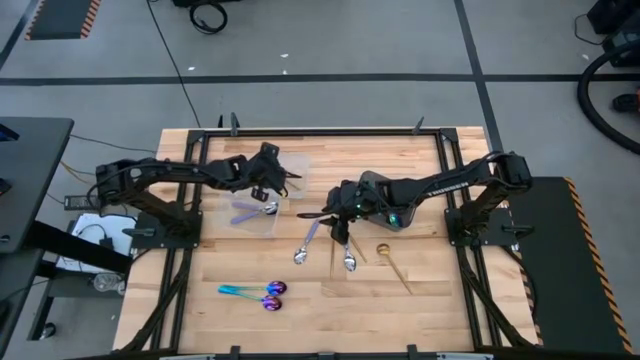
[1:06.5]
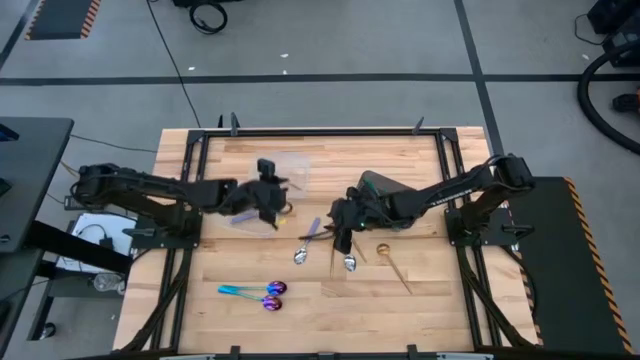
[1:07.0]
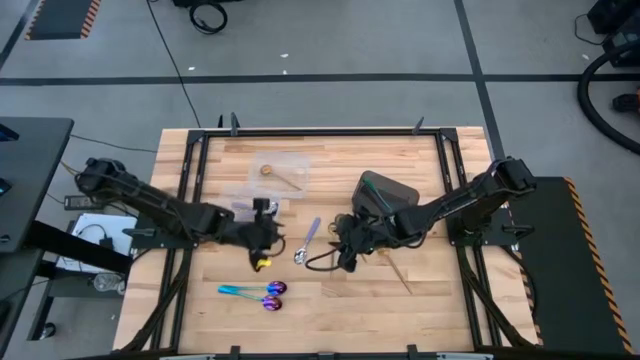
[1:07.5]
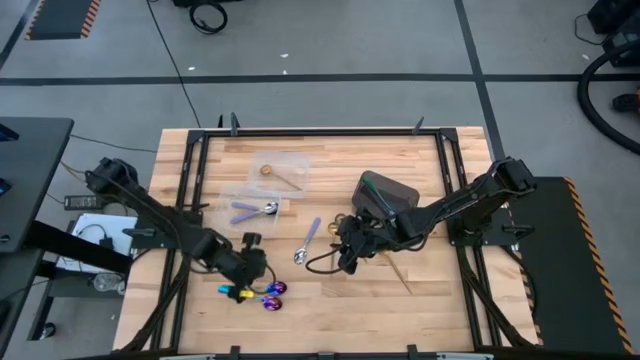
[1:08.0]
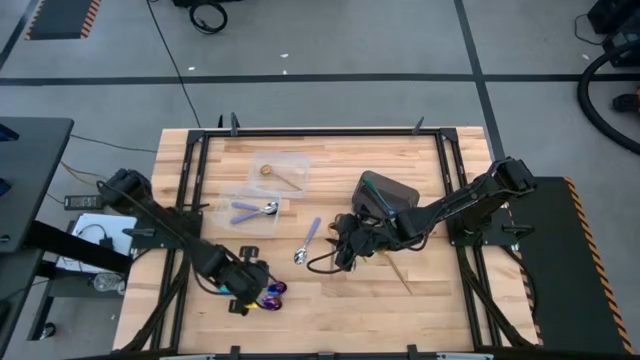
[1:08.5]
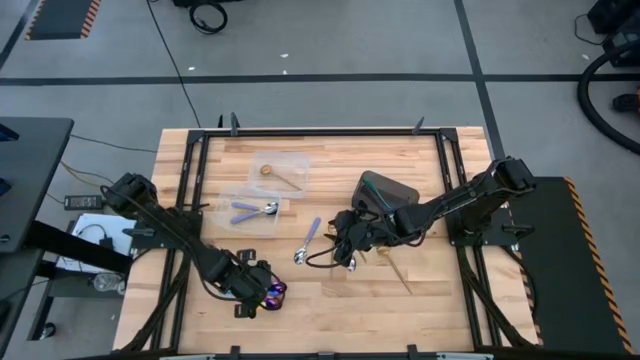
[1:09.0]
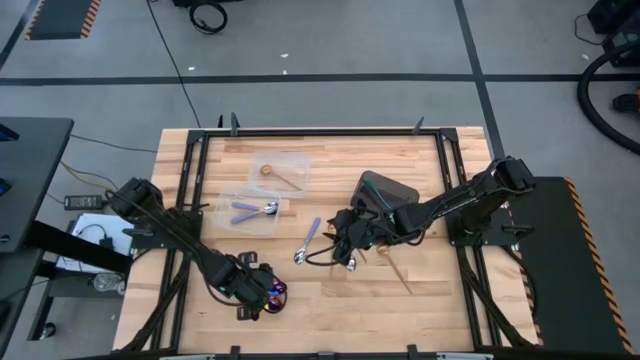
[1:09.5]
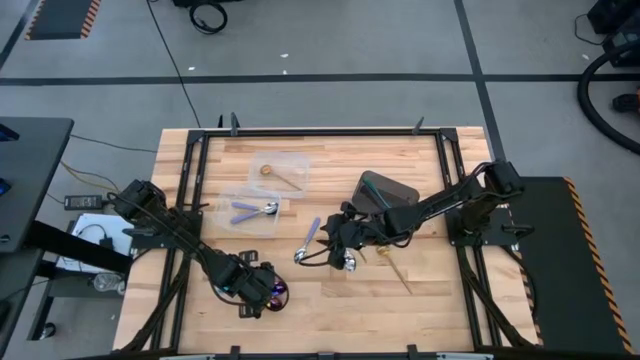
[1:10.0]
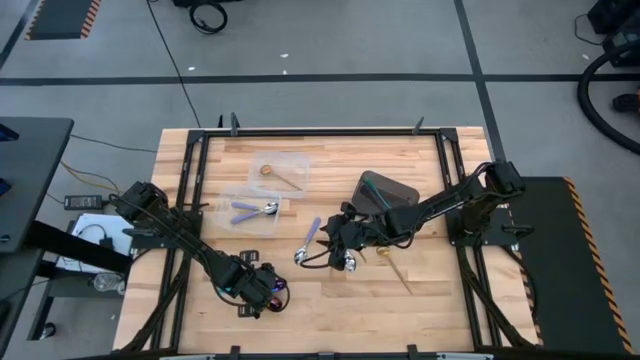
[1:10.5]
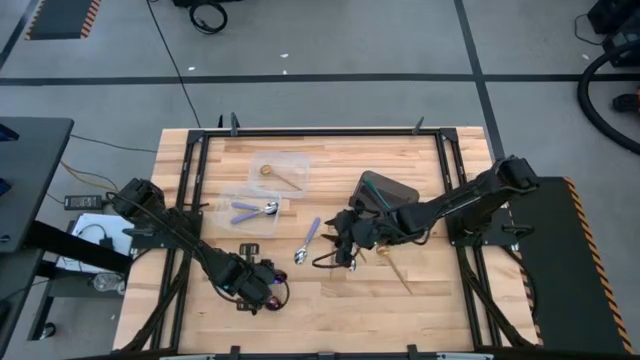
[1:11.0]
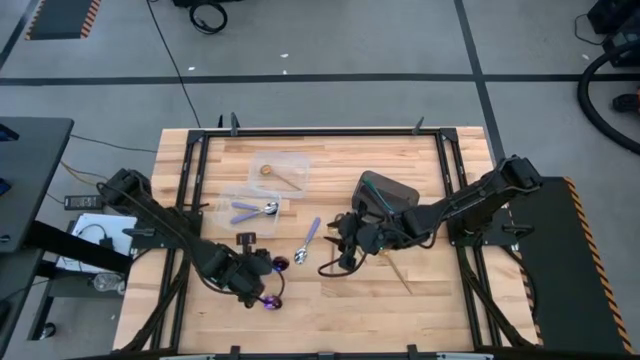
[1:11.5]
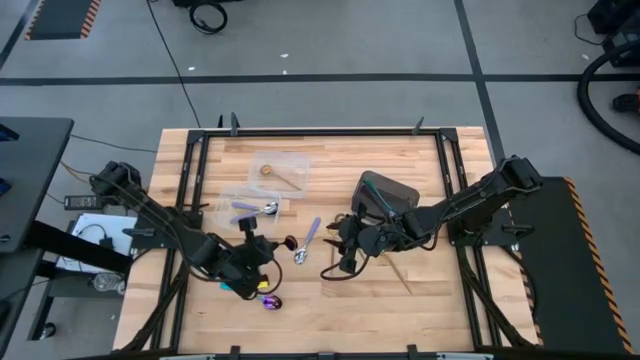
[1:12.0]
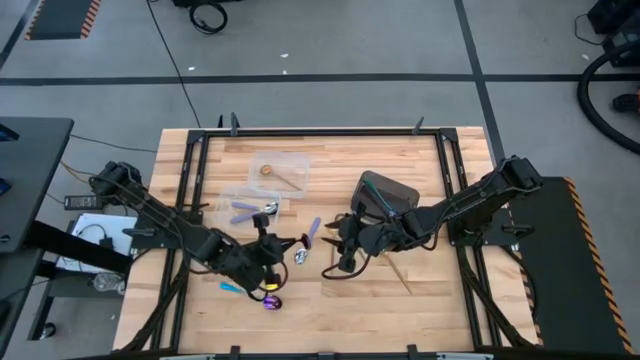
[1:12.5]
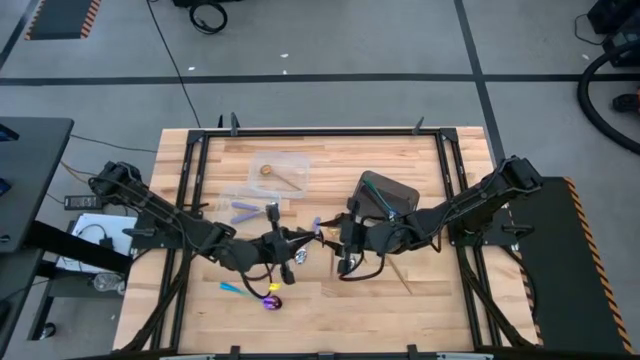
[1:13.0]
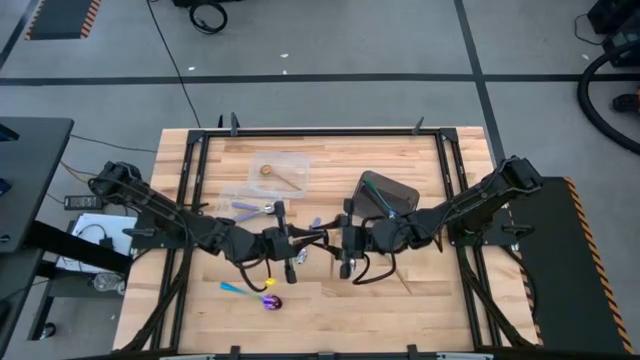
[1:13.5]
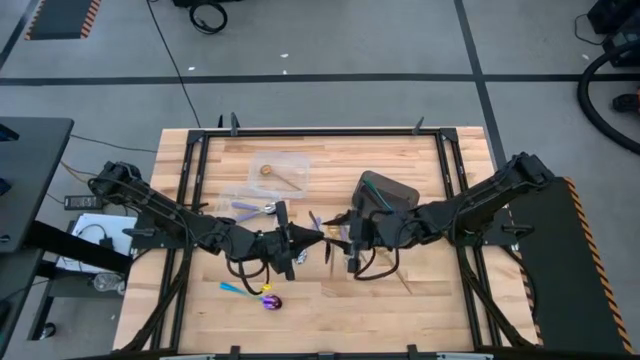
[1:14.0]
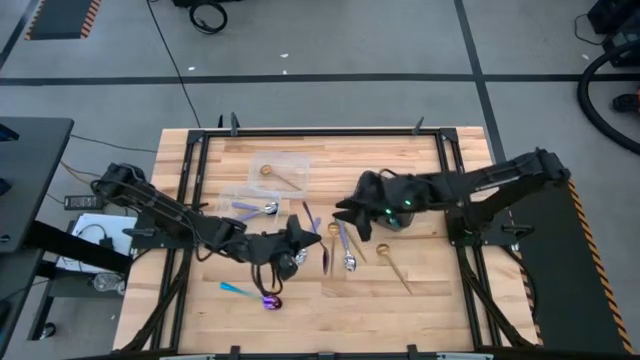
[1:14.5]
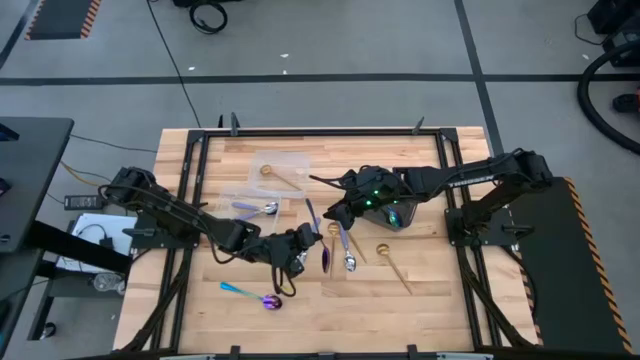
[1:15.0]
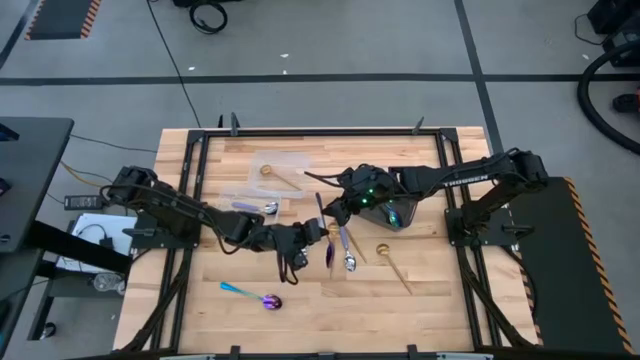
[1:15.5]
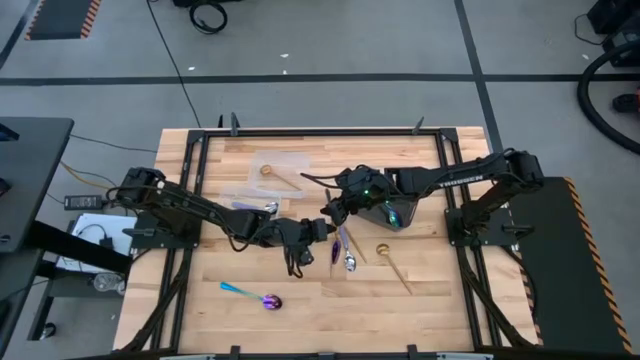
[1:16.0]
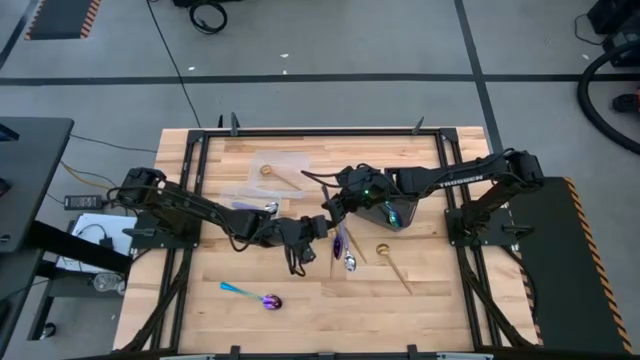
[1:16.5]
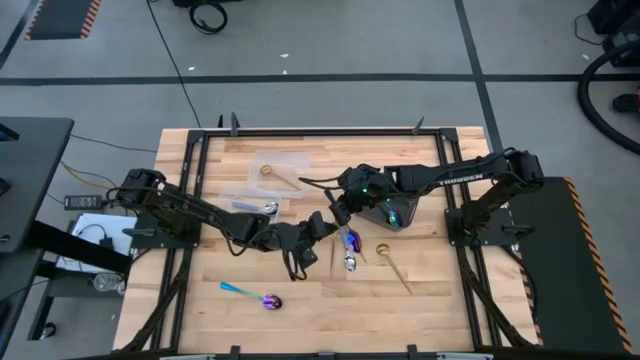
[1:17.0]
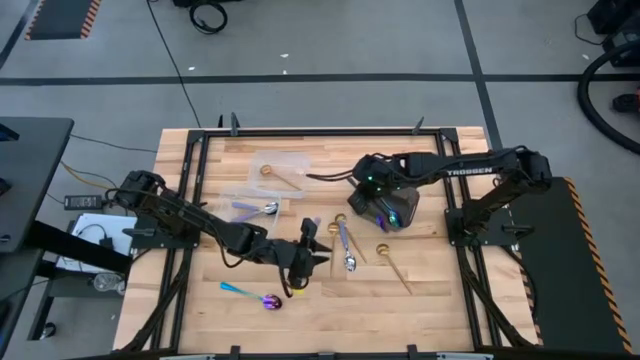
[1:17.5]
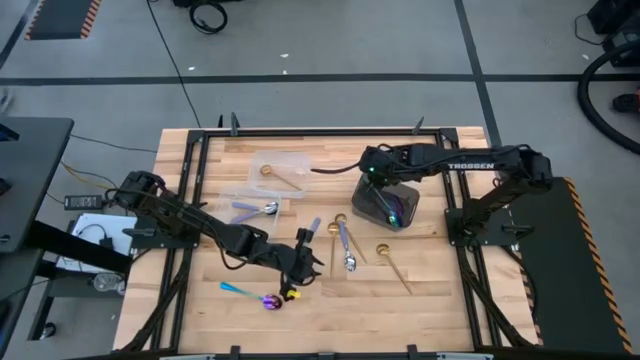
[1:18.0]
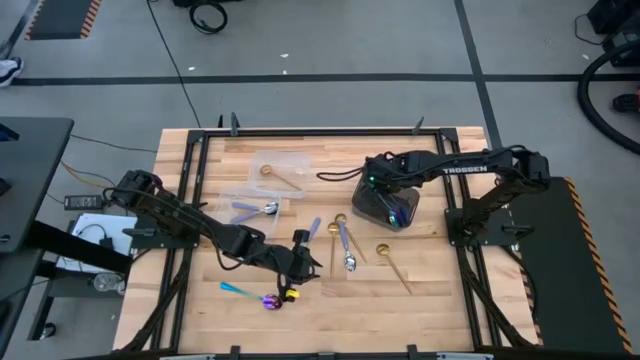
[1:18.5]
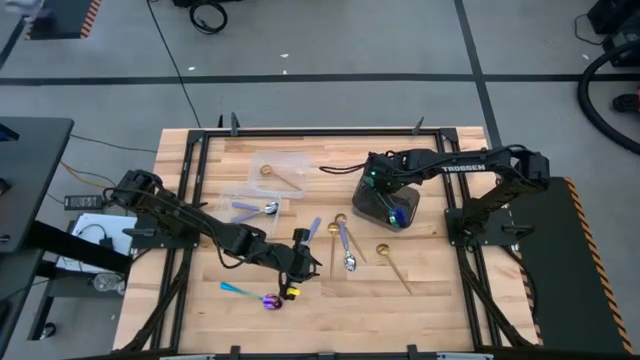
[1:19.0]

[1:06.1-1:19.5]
Task: Sort silverware by color (type)
Put the purple spoon into the black bin

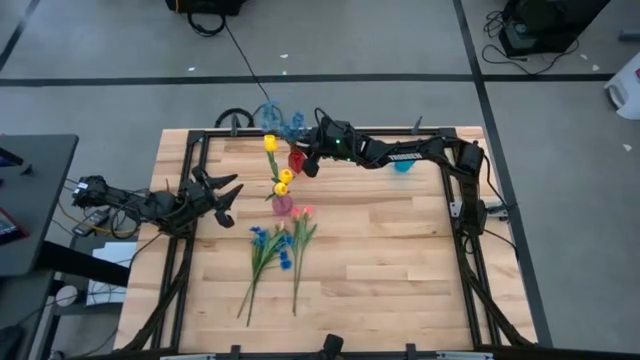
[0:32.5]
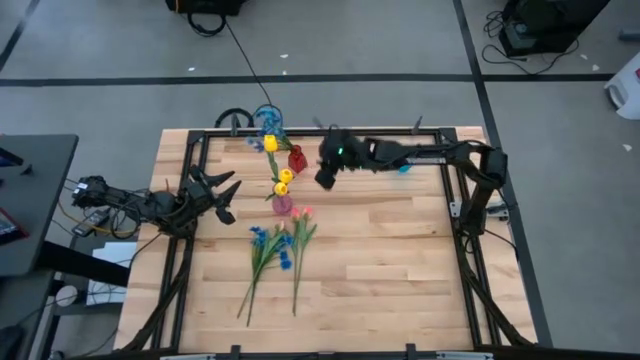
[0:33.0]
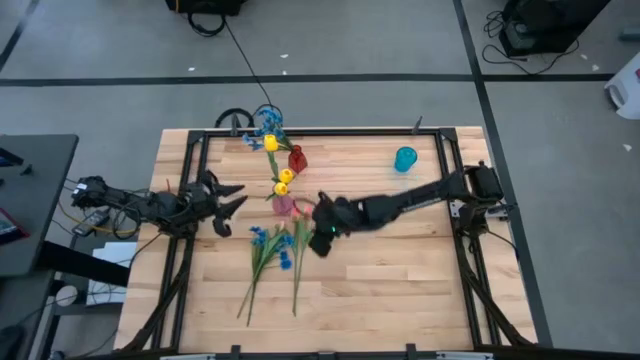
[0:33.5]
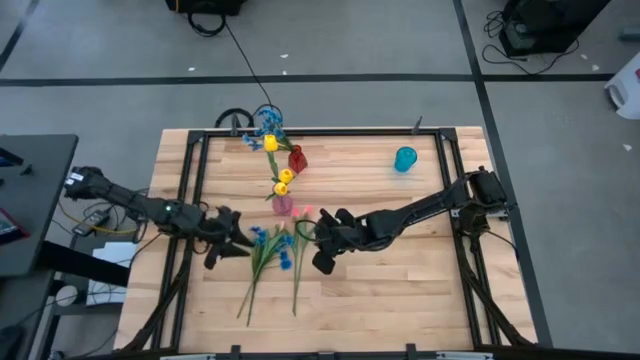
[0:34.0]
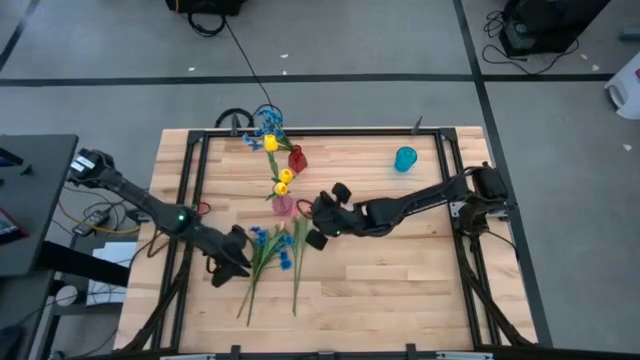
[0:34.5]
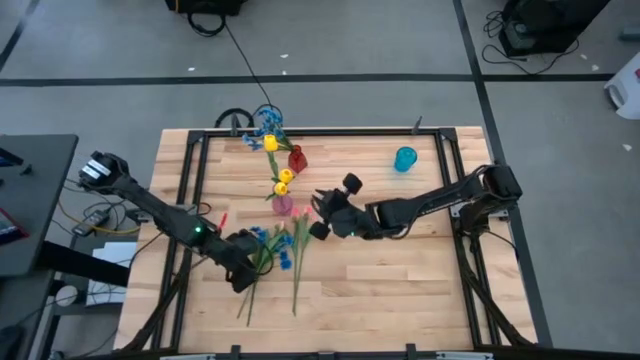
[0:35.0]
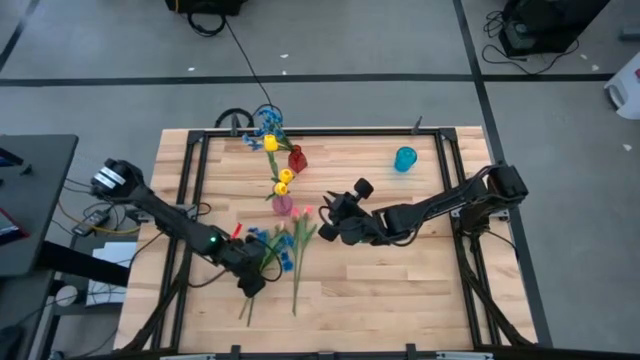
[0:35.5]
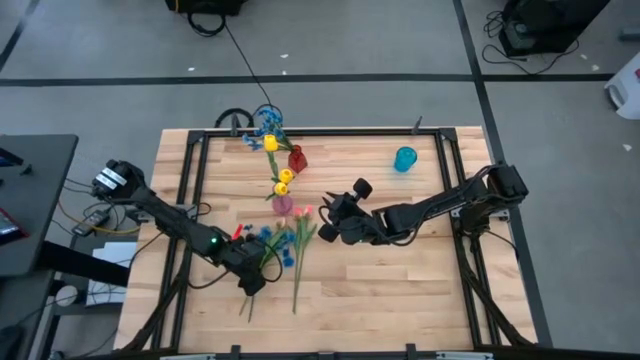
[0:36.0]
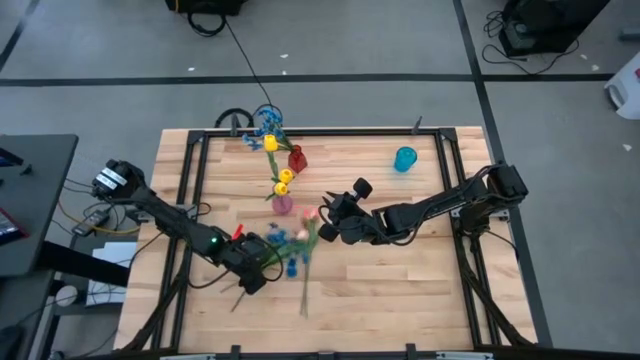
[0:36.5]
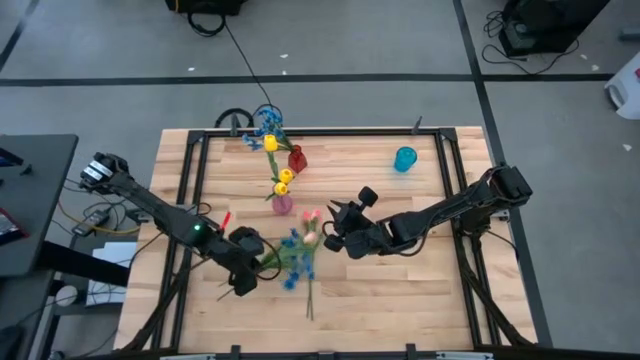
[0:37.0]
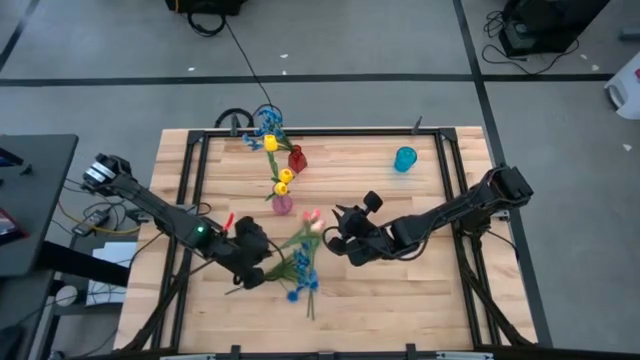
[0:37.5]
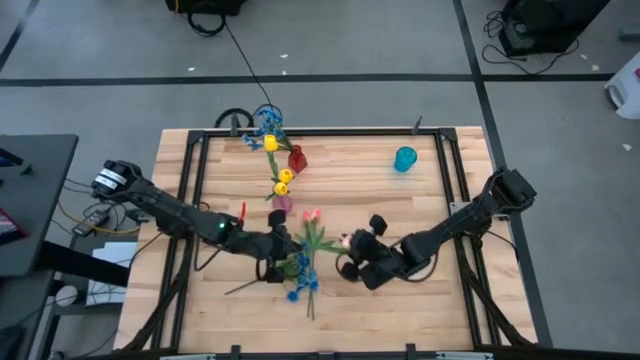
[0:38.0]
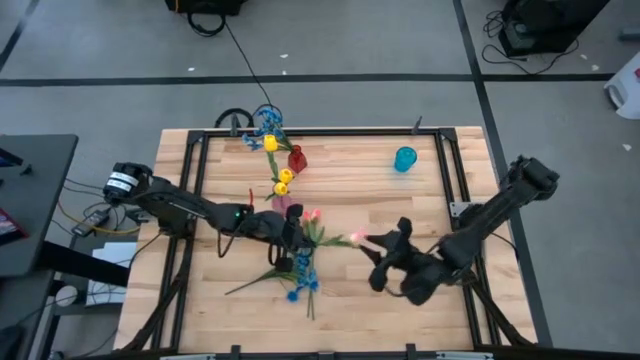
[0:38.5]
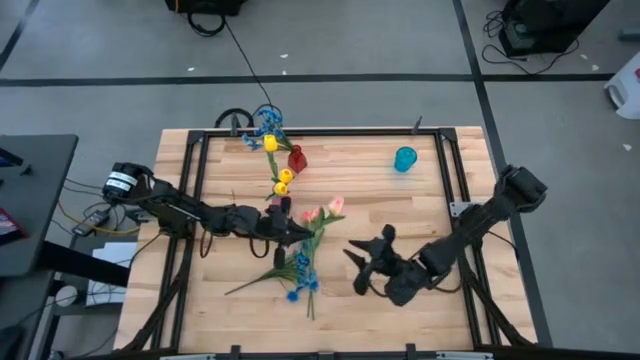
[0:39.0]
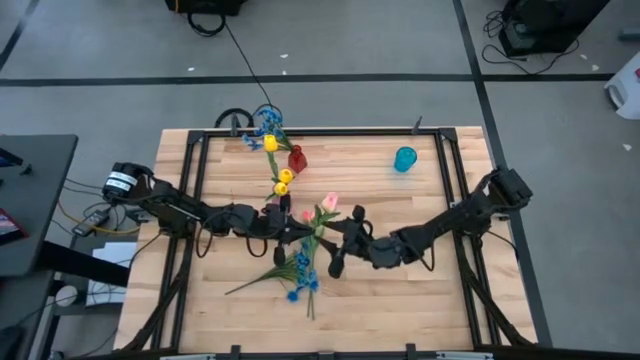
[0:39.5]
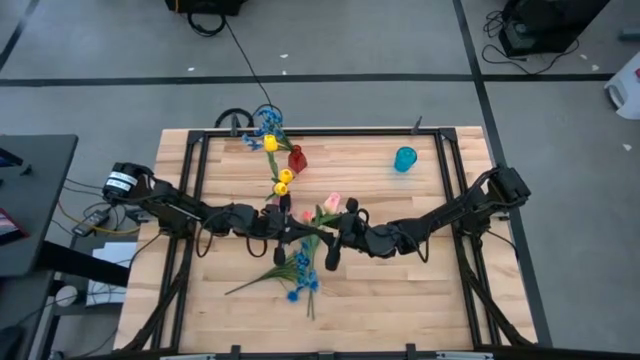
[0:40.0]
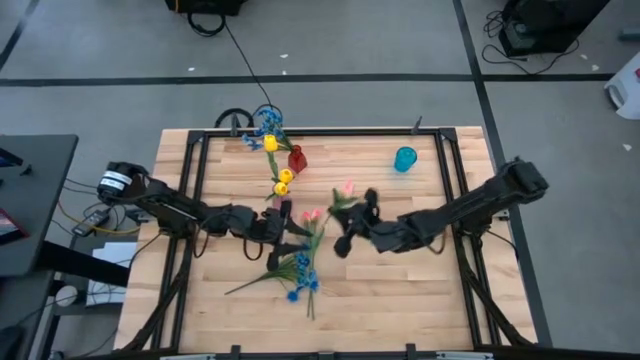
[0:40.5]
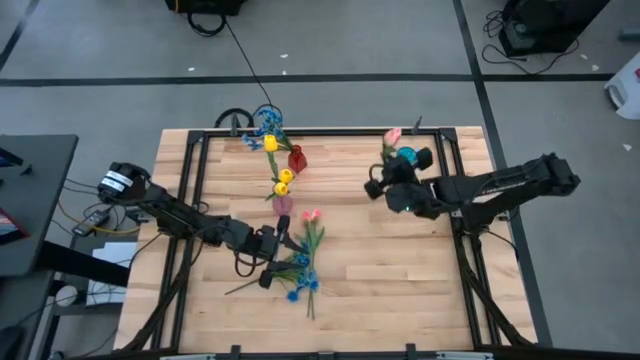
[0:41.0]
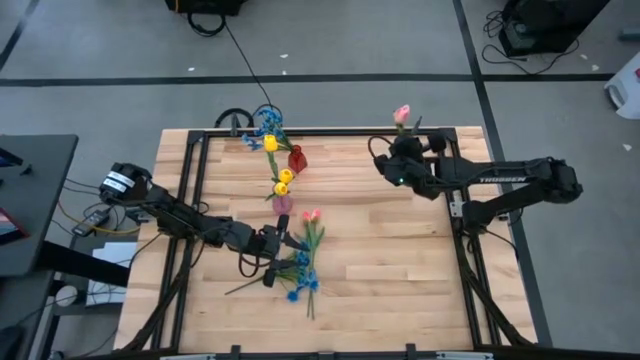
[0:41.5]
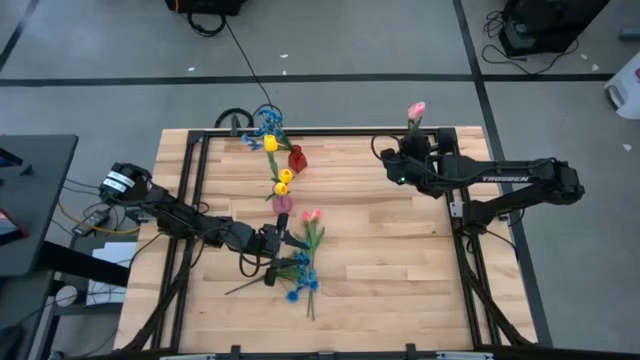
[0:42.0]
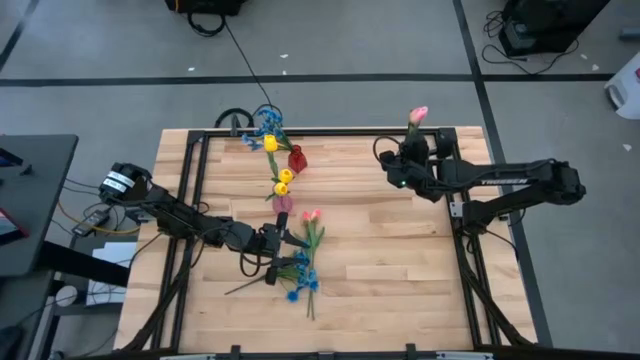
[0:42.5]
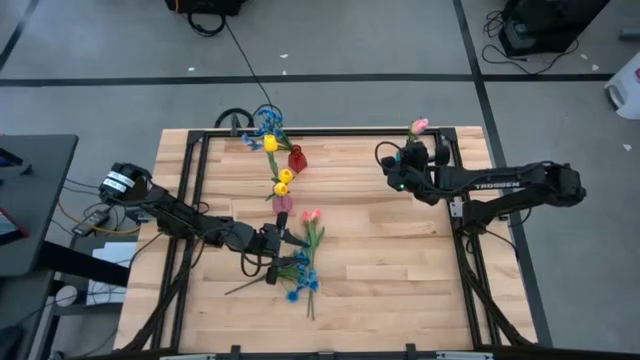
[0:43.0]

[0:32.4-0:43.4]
Task: Sort flowers into vase by color
Put the left pink tulip into the blue vase
